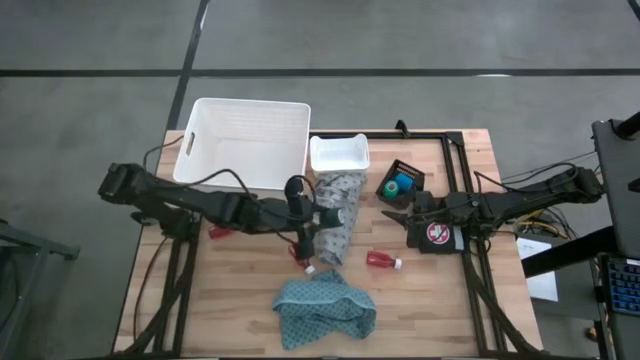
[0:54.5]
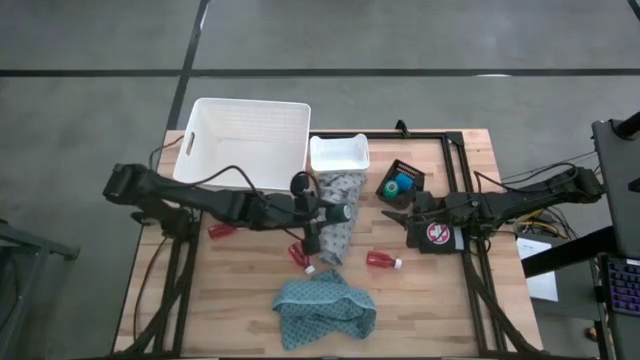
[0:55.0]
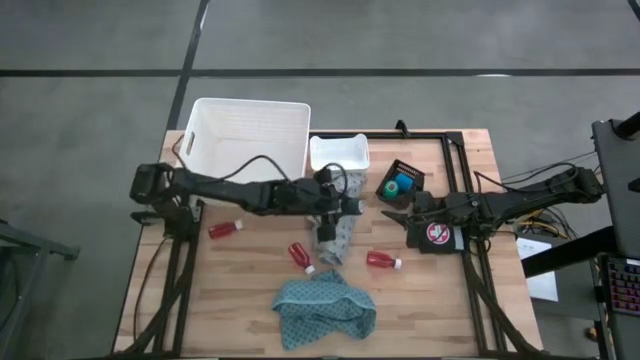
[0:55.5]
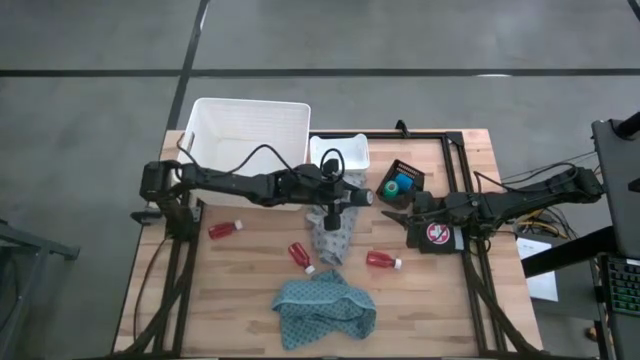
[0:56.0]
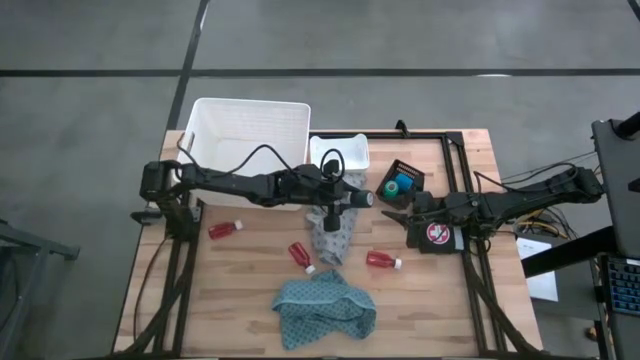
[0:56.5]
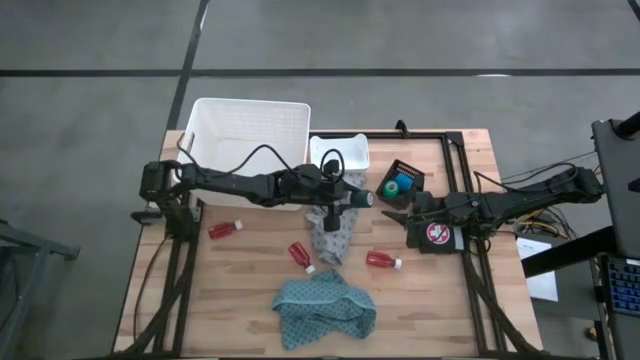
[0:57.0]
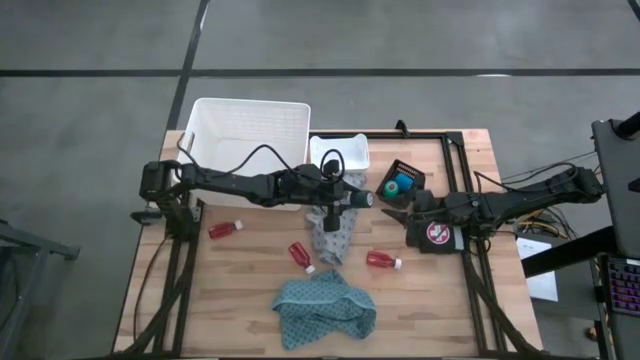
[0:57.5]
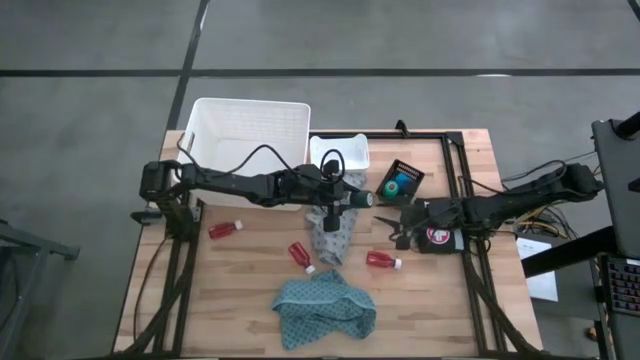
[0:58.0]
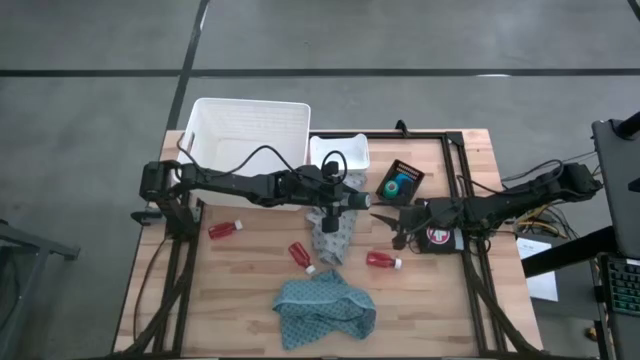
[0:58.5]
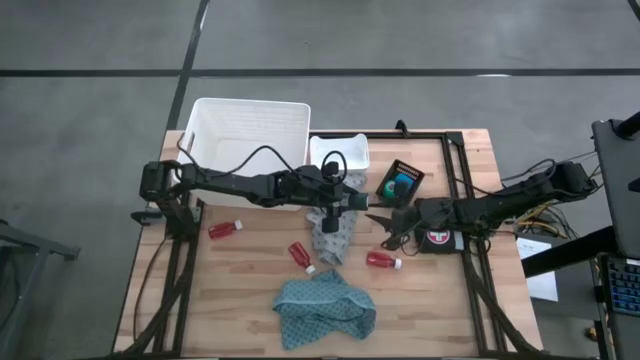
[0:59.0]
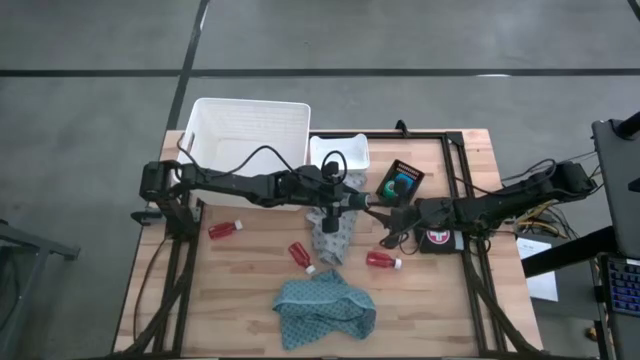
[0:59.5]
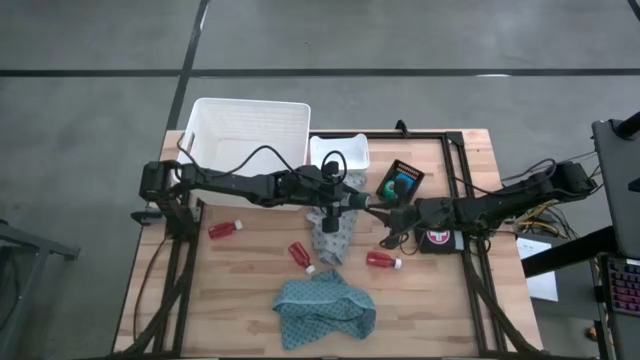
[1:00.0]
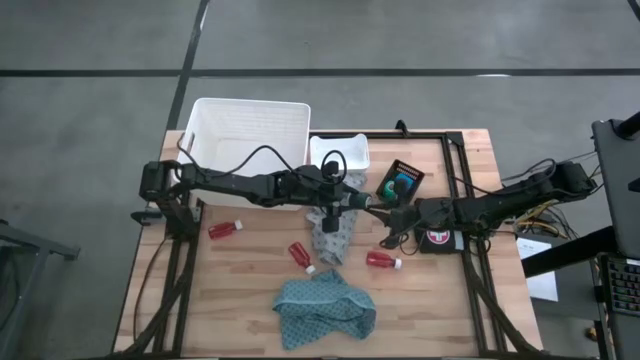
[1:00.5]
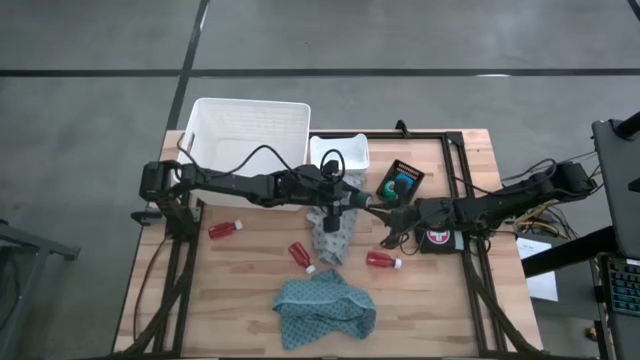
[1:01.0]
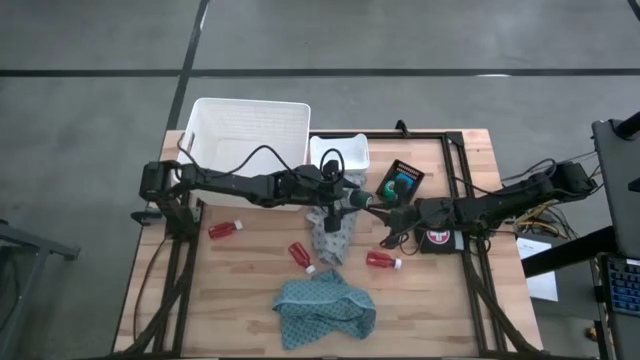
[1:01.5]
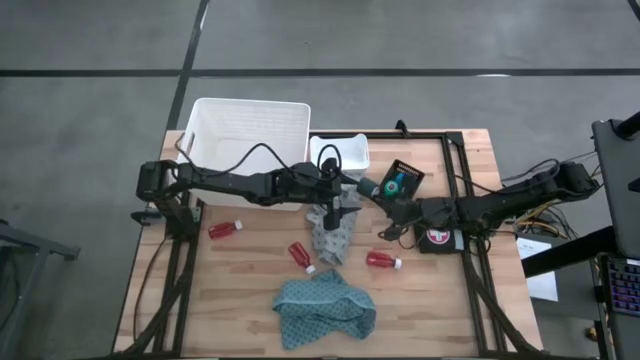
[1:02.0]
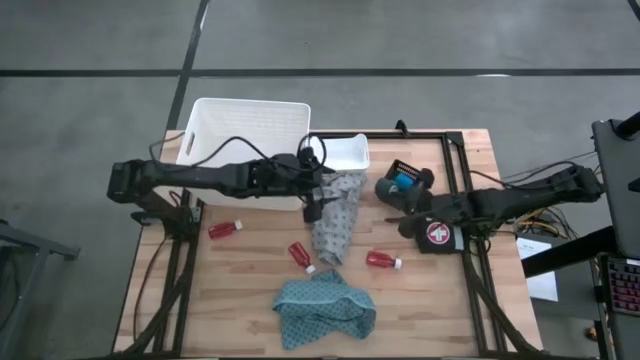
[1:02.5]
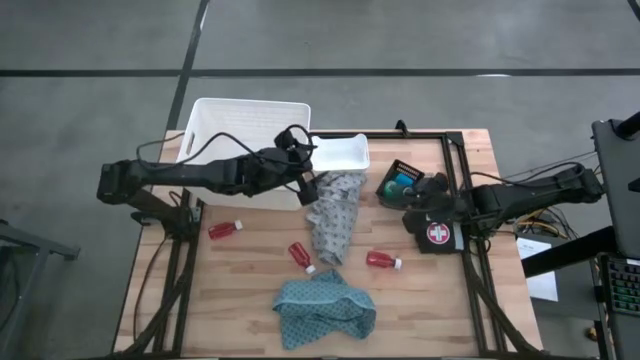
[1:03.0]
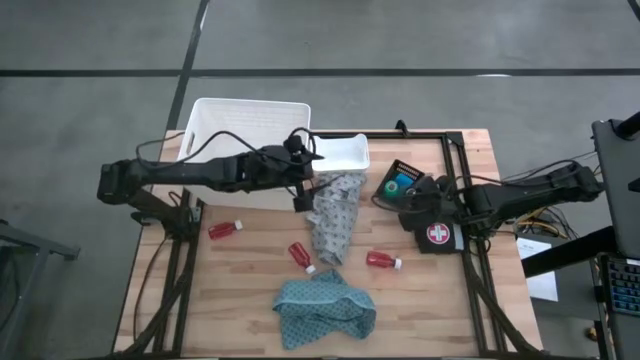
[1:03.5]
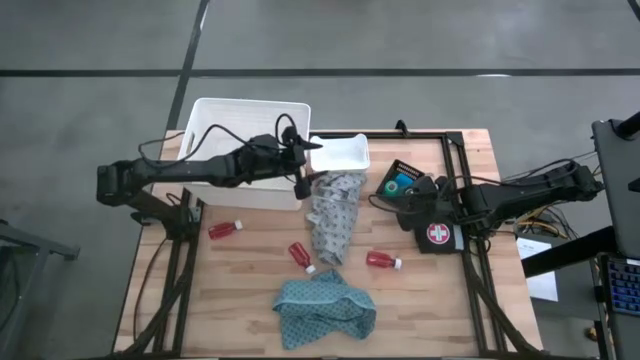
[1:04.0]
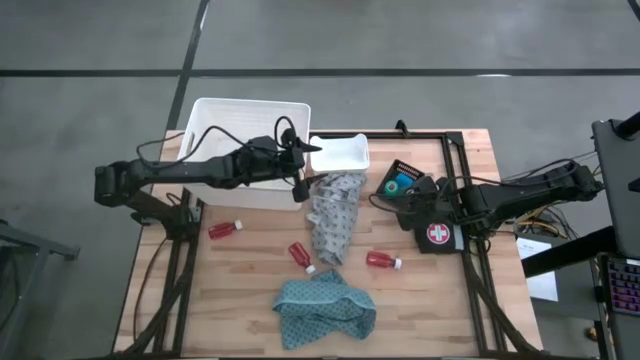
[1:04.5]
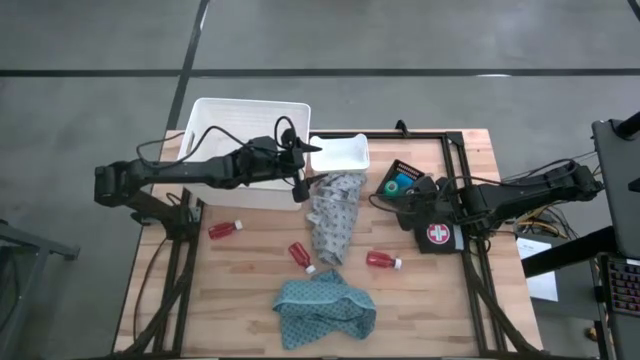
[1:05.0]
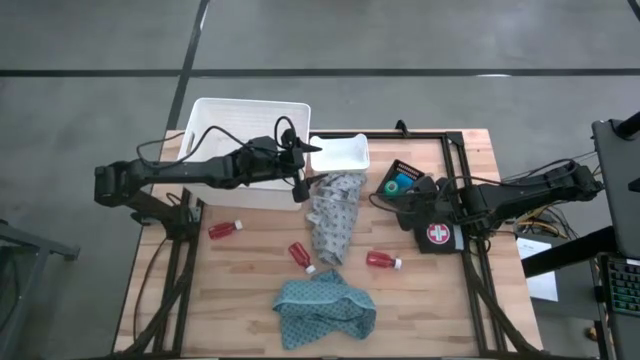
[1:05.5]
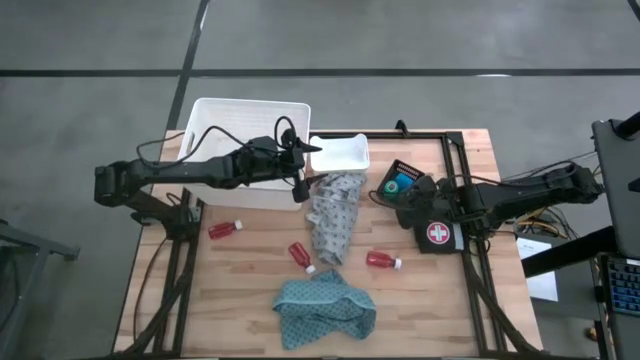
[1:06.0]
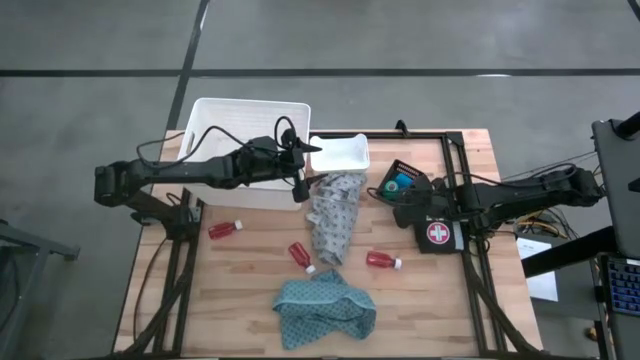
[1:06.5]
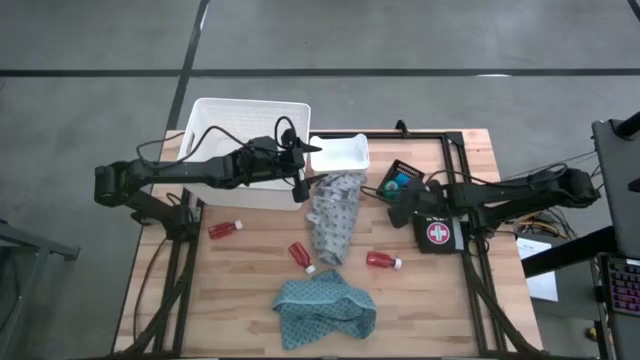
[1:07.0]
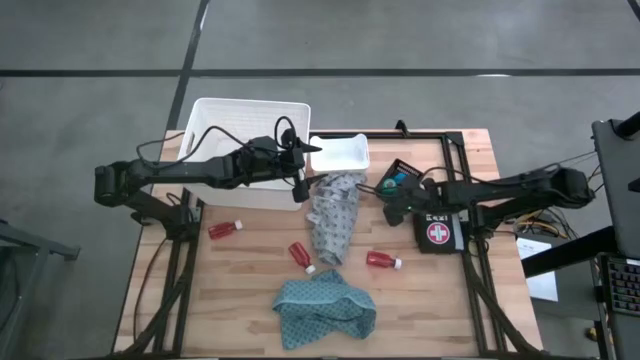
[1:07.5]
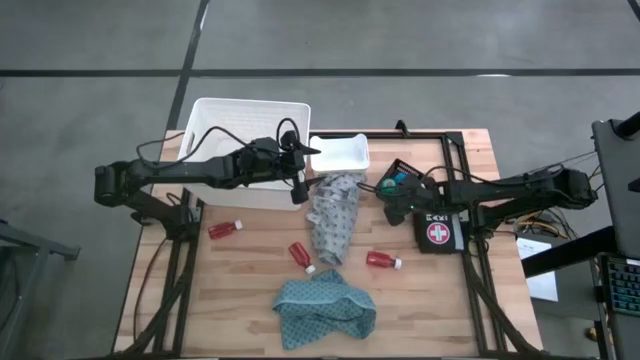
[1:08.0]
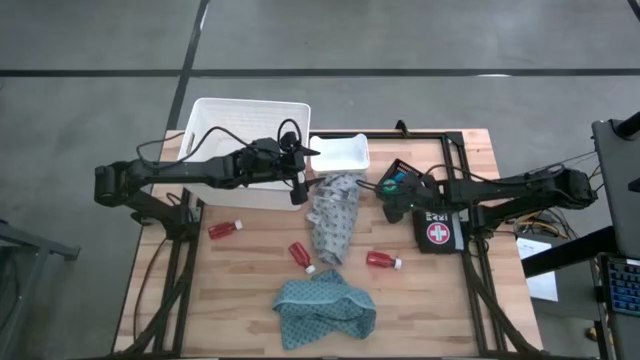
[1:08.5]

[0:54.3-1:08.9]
Task: Pick & Place Medicine items
Put the green bandage into the black bin

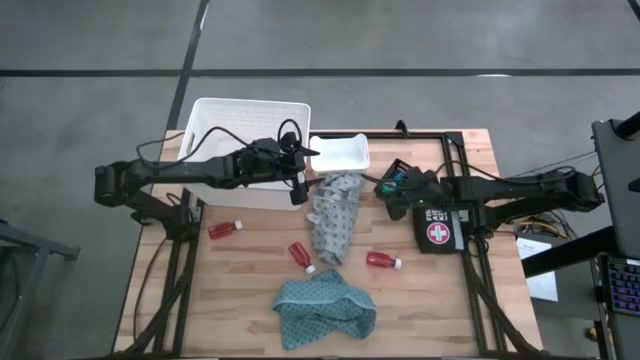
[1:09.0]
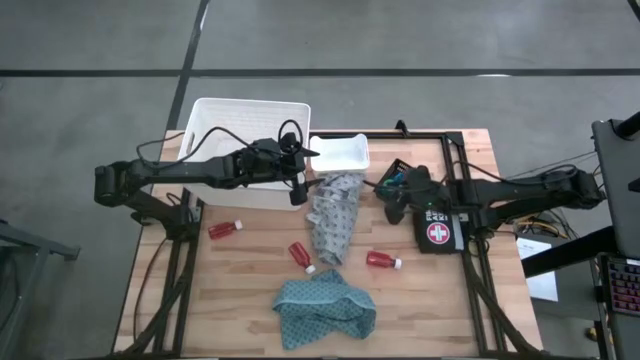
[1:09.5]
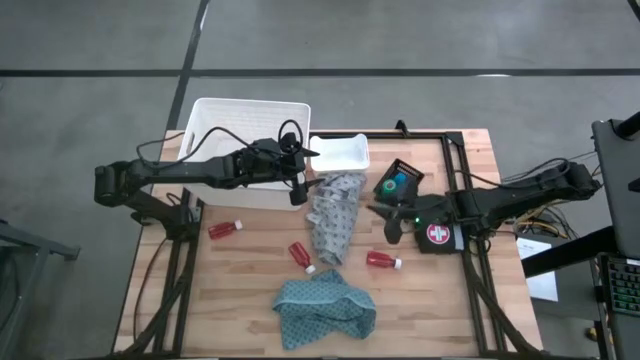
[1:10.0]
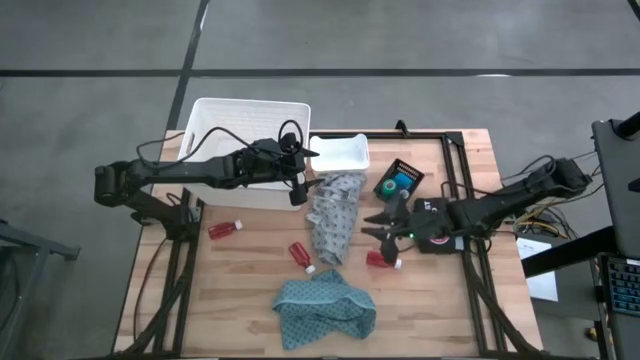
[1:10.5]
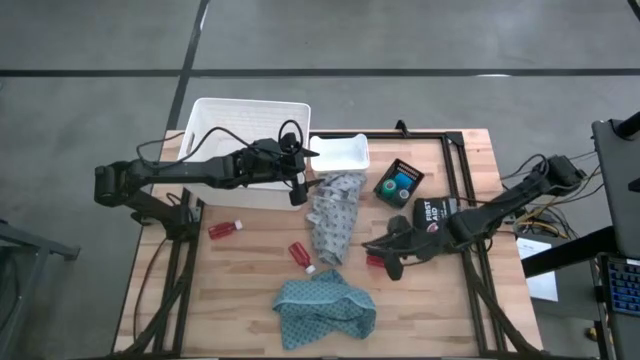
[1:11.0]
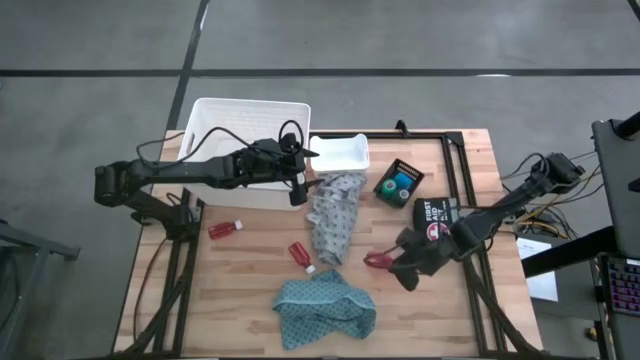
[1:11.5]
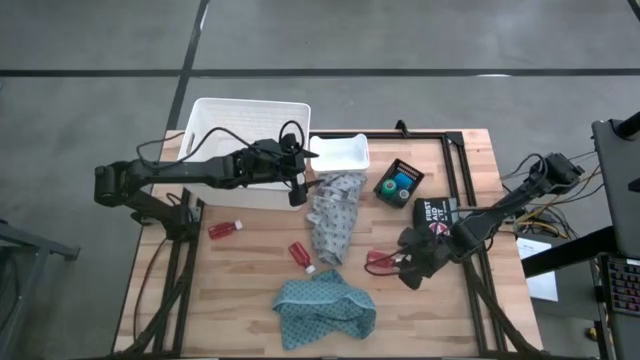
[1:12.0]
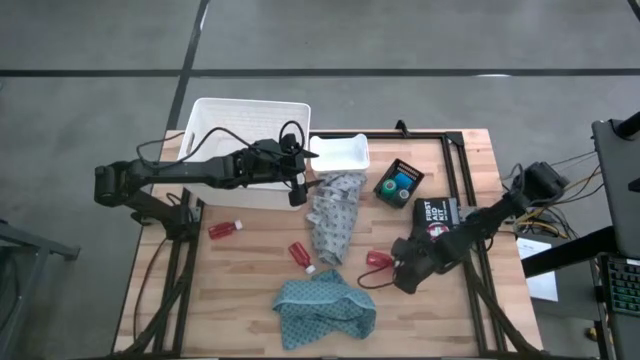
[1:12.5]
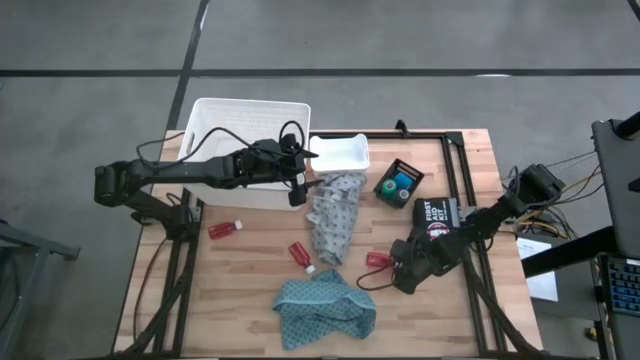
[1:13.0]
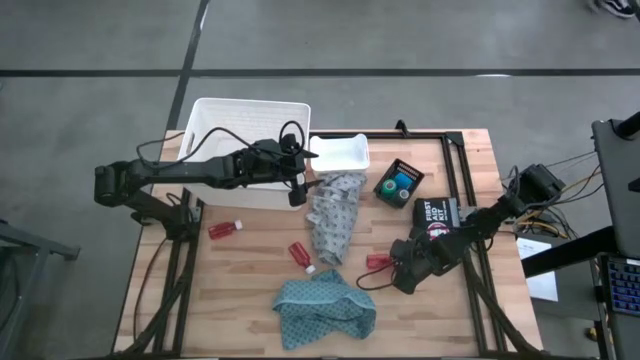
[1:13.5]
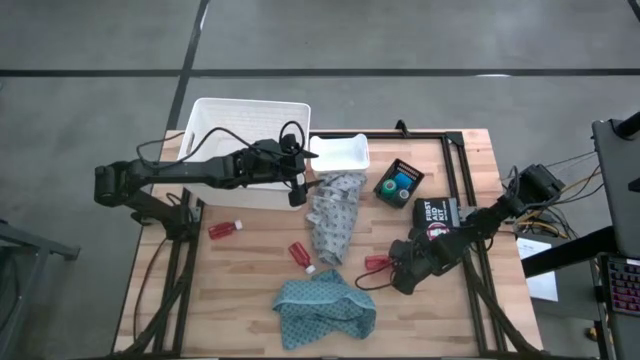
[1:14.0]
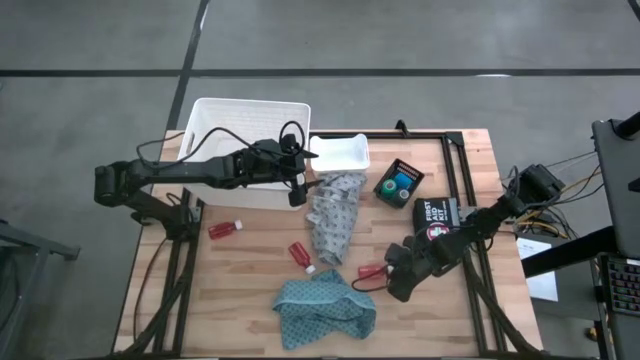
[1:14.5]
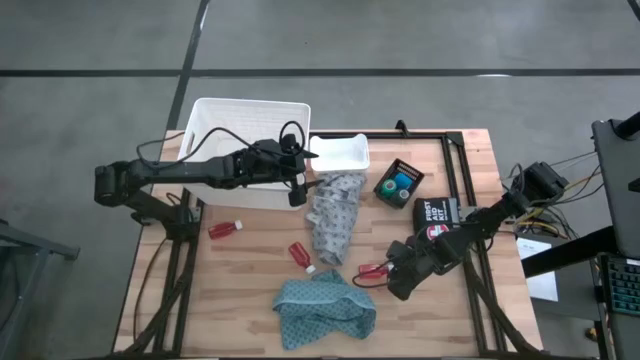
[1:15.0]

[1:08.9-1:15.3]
Put the right red medicine bottle into the small white bin
